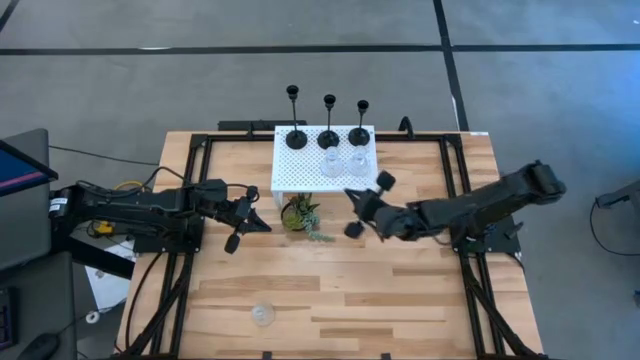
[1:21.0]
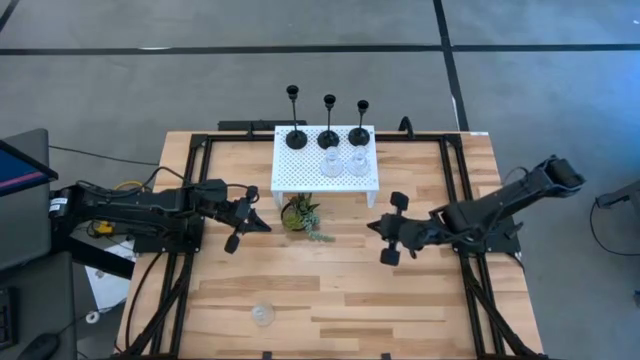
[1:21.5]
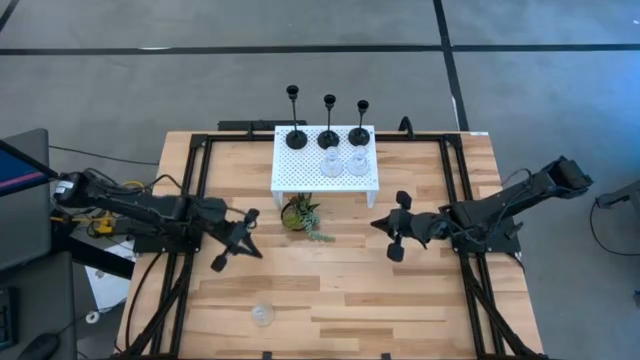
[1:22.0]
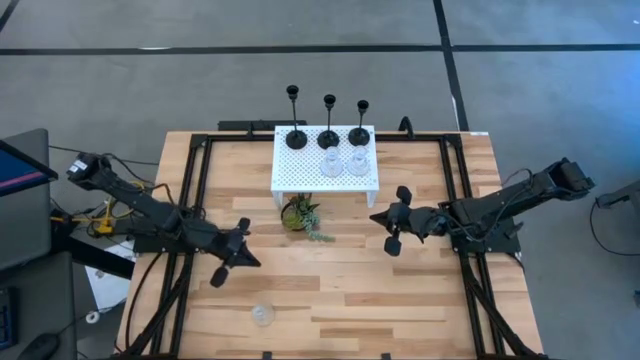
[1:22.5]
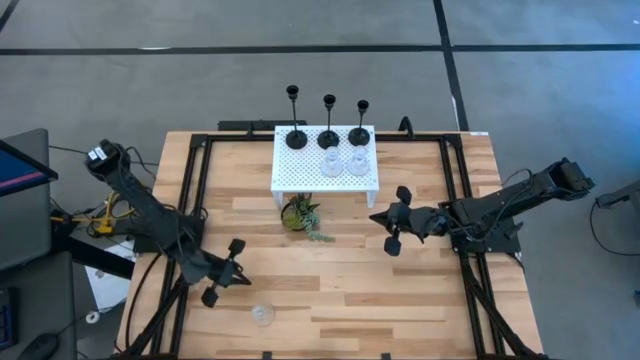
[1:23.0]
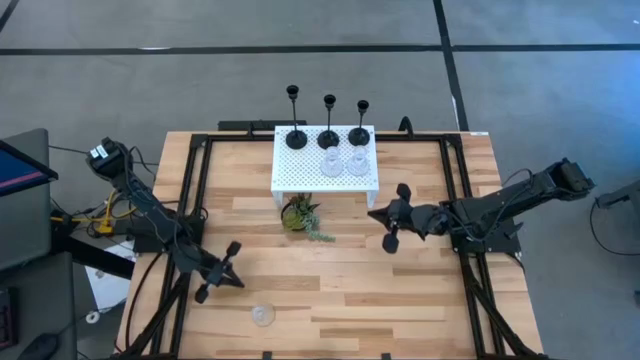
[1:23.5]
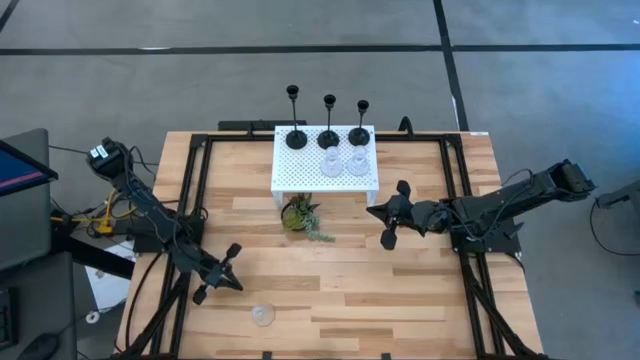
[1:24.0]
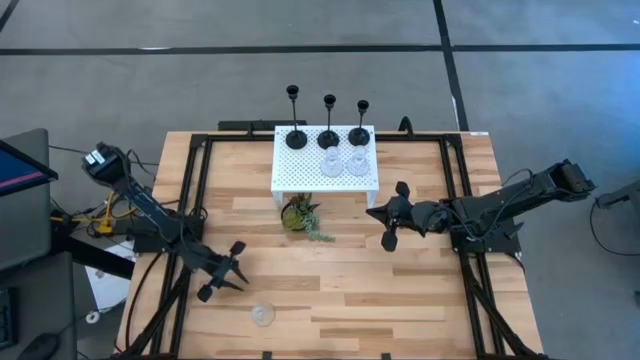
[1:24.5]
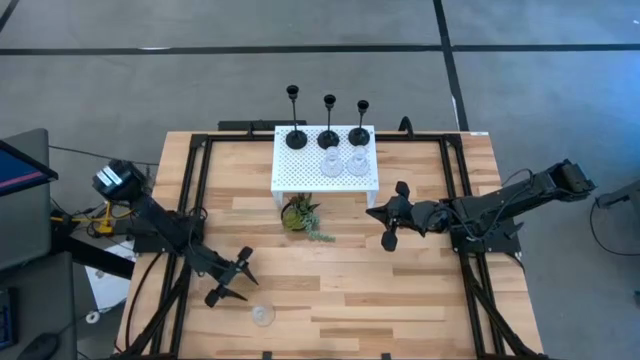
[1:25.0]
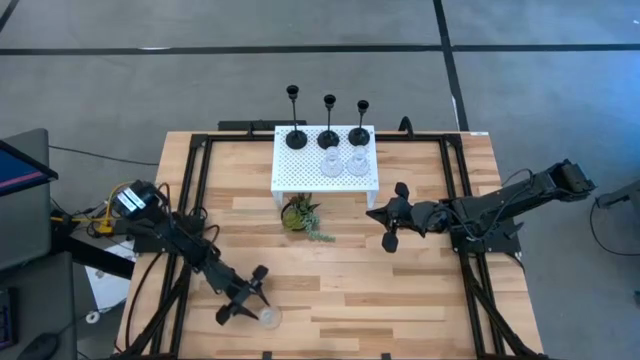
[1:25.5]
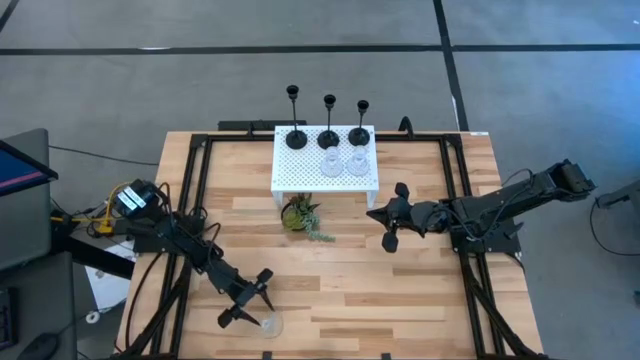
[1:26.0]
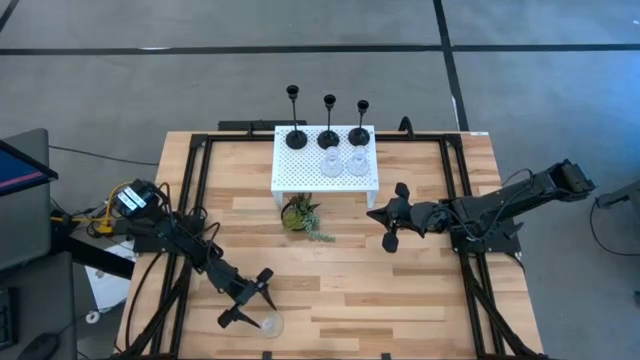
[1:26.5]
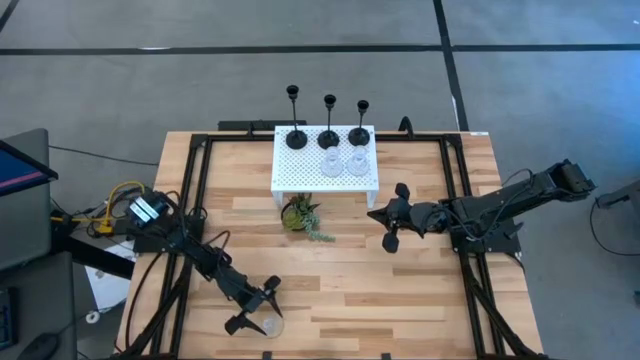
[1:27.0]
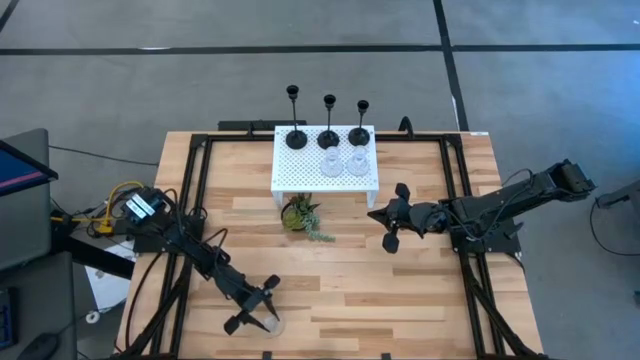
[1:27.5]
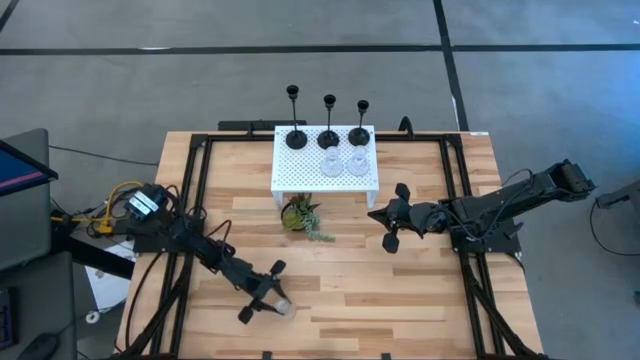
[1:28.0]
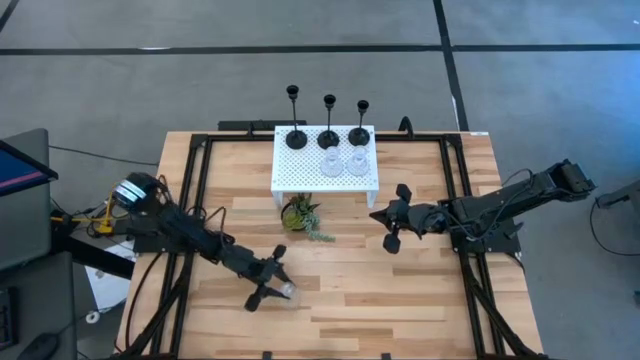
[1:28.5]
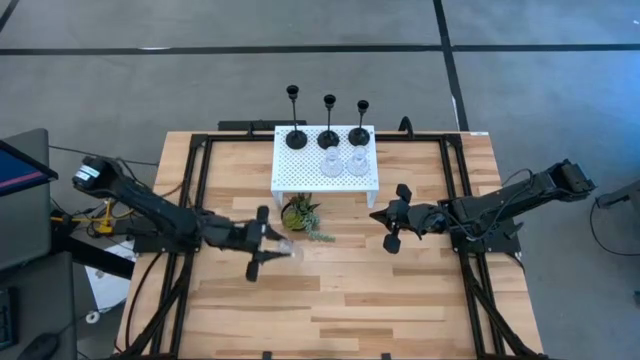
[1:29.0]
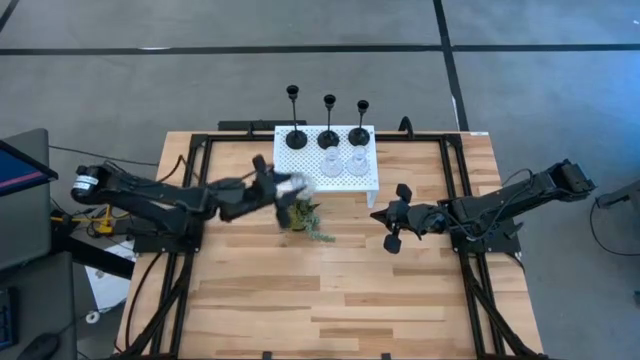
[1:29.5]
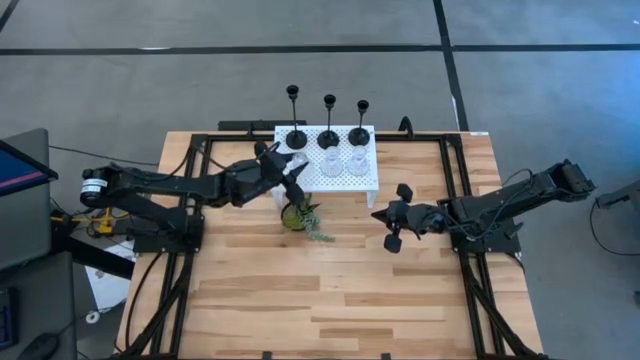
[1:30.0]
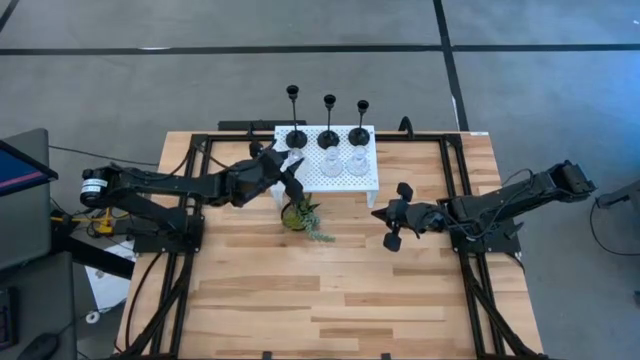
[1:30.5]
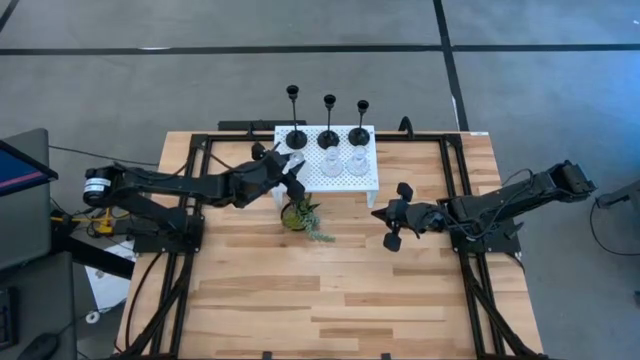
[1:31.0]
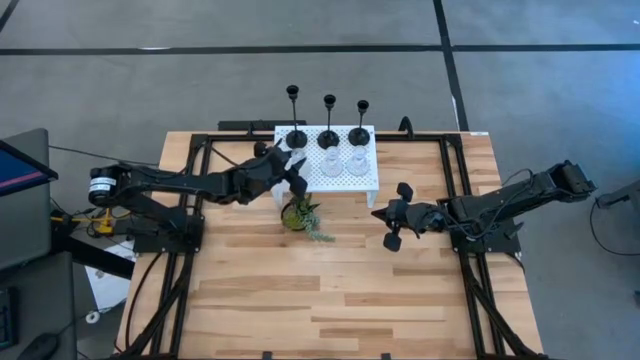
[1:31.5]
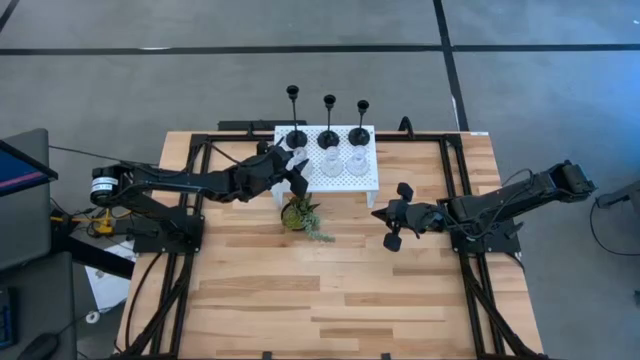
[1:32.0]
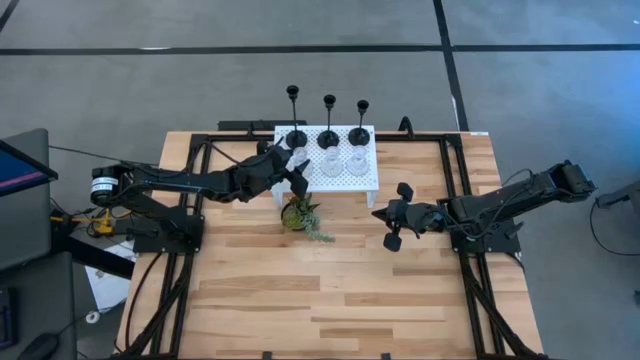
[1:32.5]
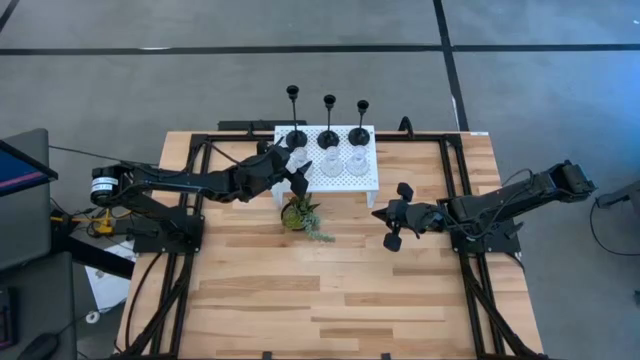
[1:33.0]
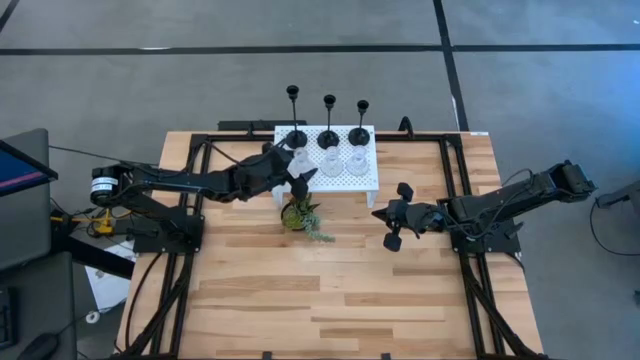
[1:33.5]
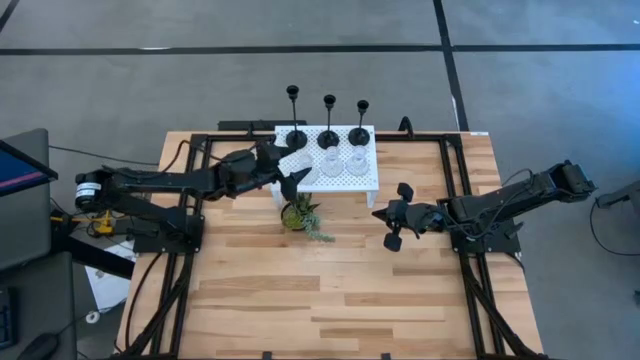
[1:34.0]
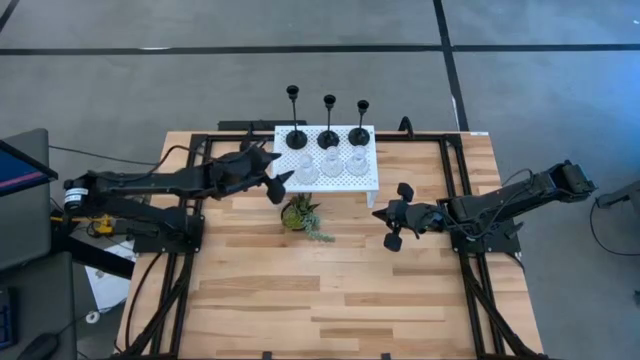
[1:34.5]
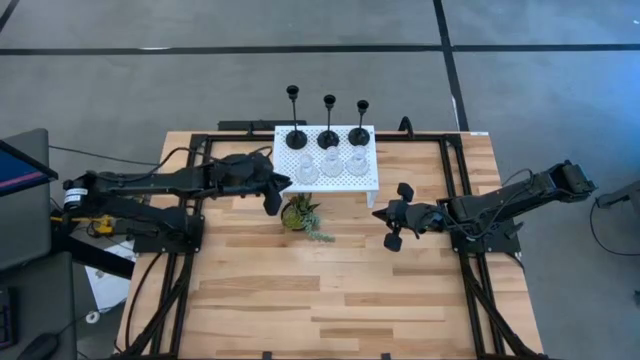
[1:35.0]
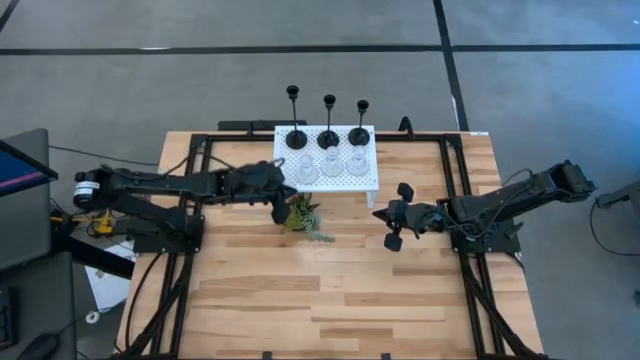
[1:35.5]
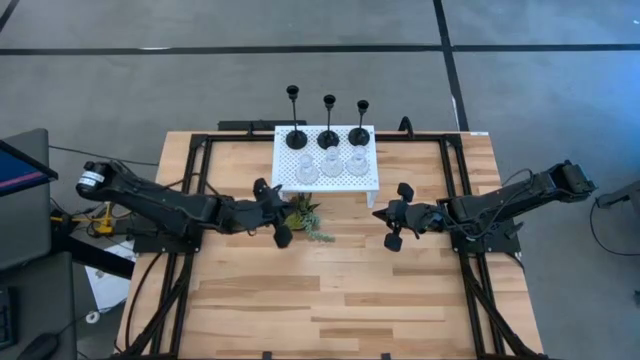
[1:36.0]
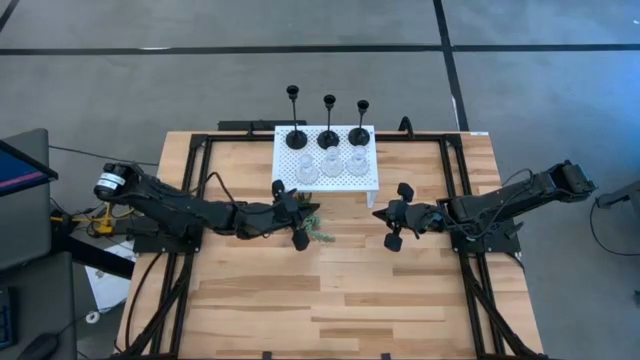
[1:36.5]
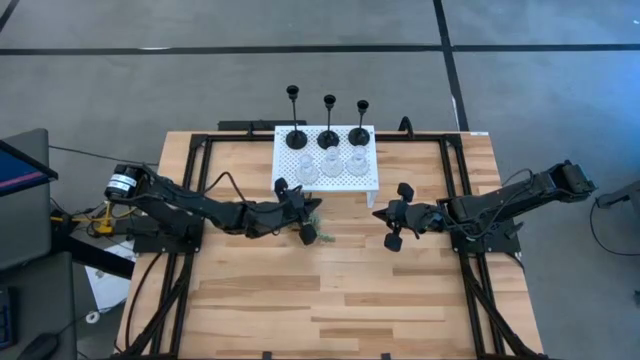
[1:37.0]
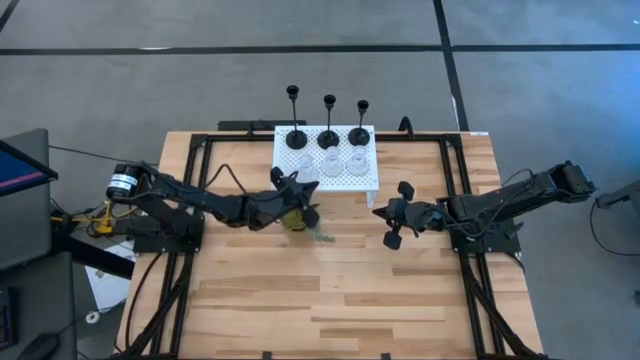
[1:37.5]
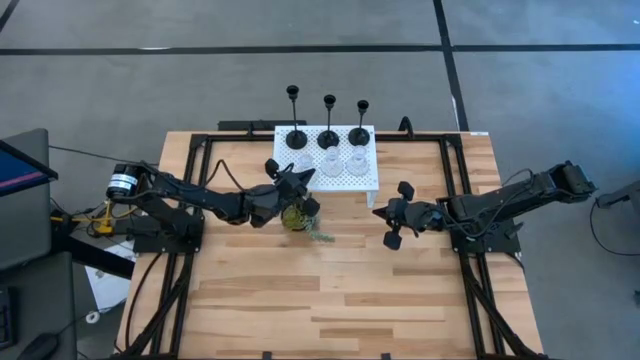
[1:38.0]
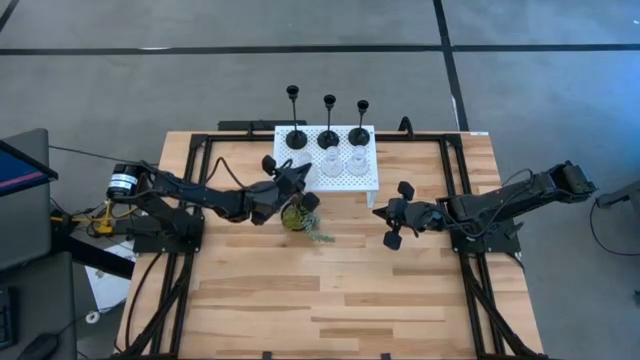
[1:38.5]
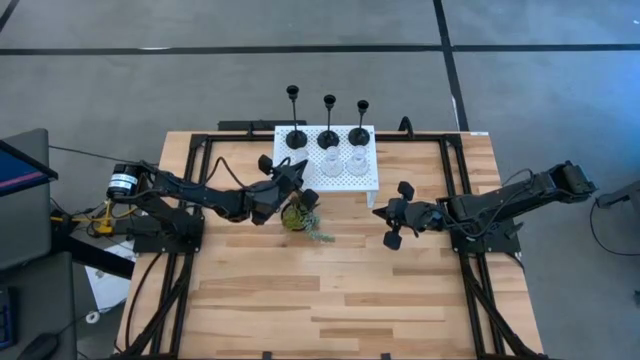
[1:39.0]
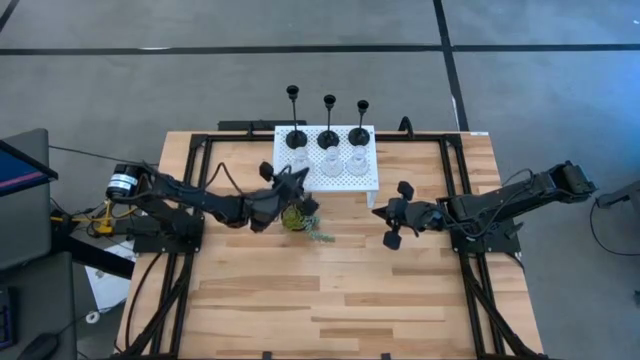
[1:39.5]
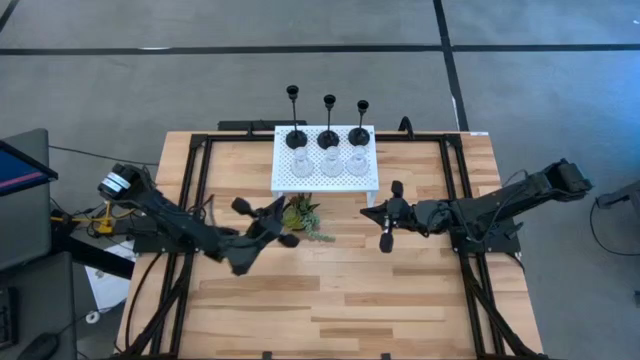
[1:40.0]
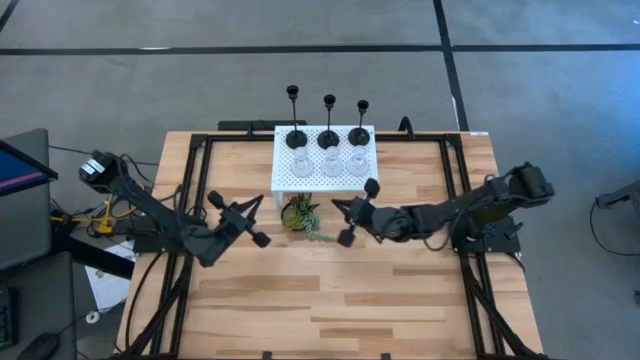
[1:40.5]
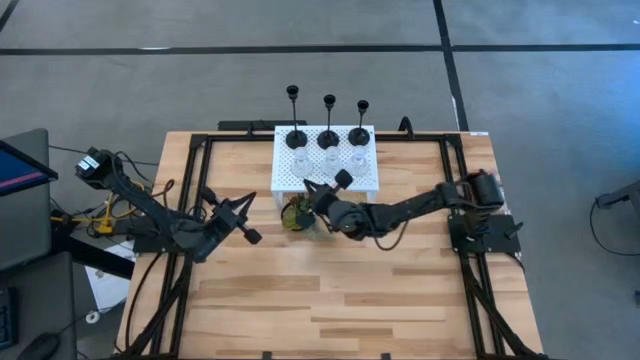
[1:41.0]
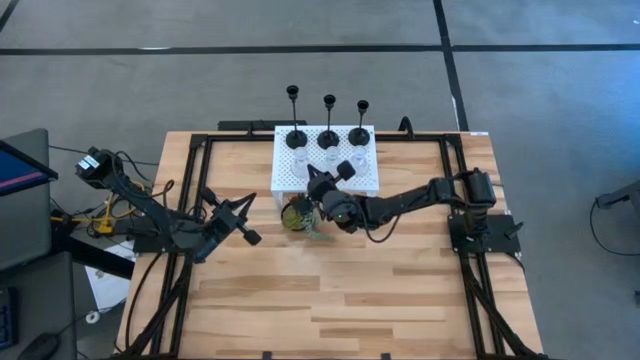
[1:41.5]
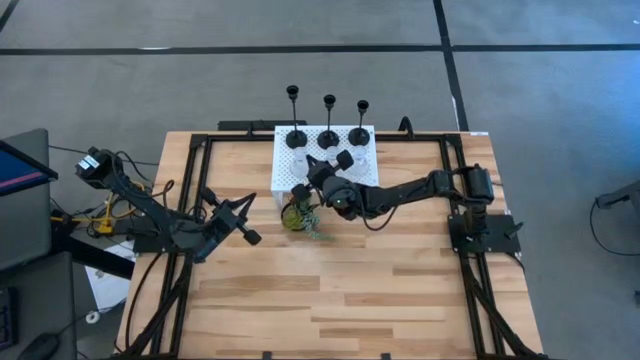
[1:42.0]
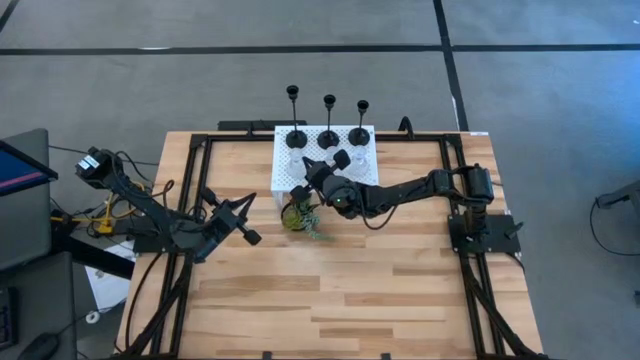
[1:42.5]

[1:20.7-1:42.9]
Task: Pick & Place candle stick holders
Put the transparent glass candle holder on the shelf aligned with the transparent candle holder

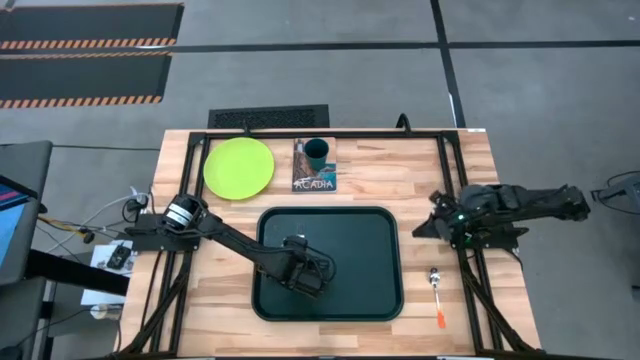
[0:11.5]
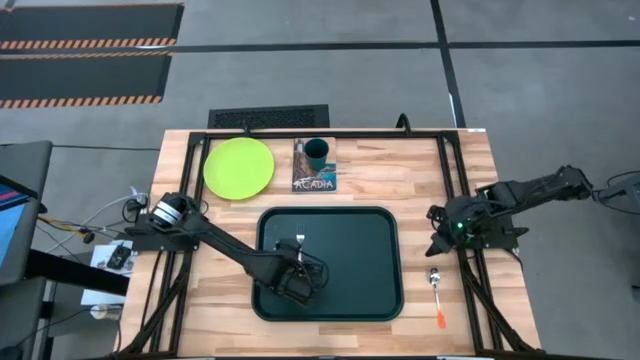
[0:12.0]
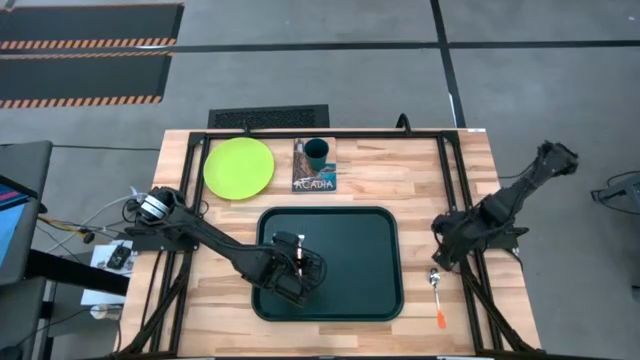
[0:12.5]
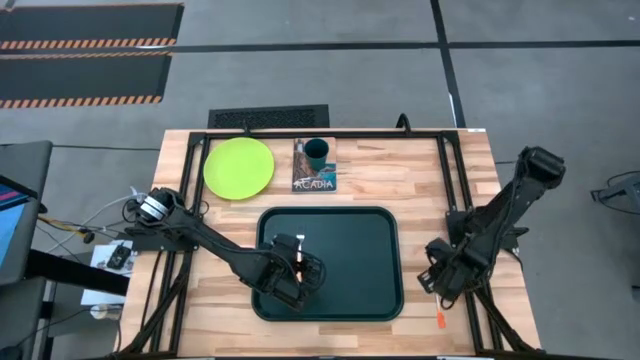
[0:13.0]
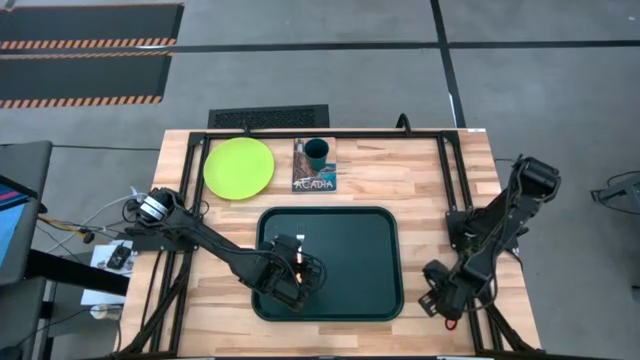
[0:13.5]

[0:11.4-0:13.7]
Task: Pick and place plate/cup/fork/spoon on tray
Put the orange spoon on the black tray to the left of the orange fork
